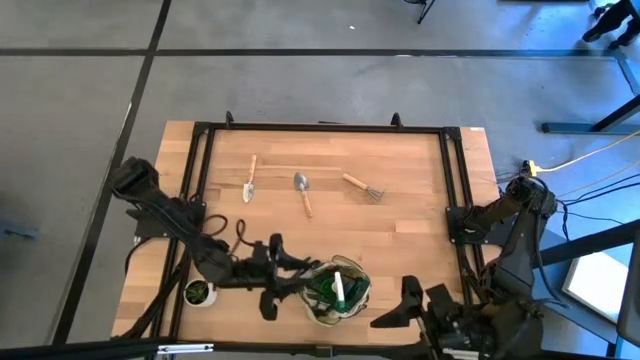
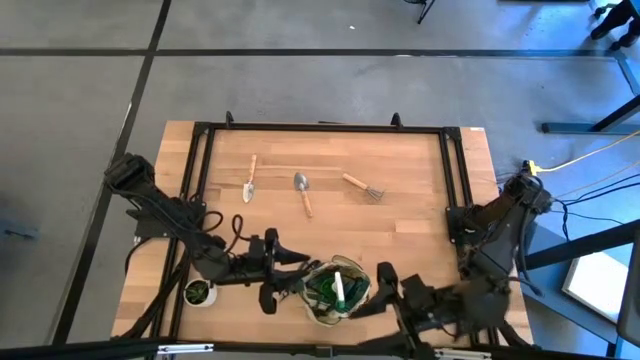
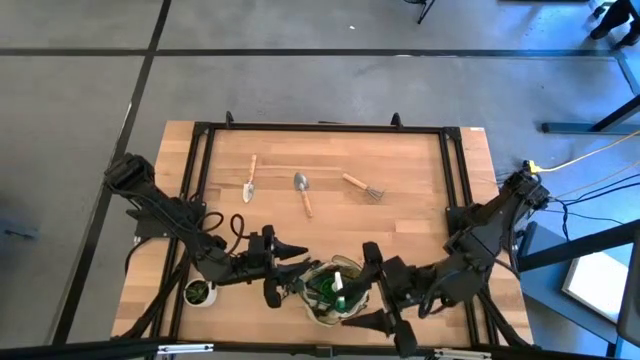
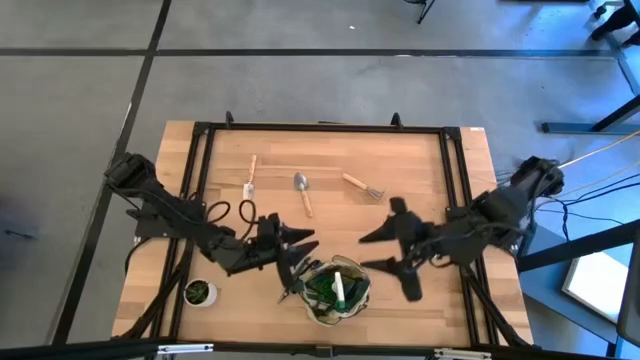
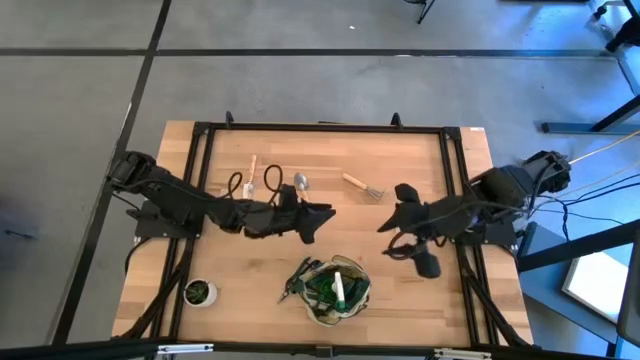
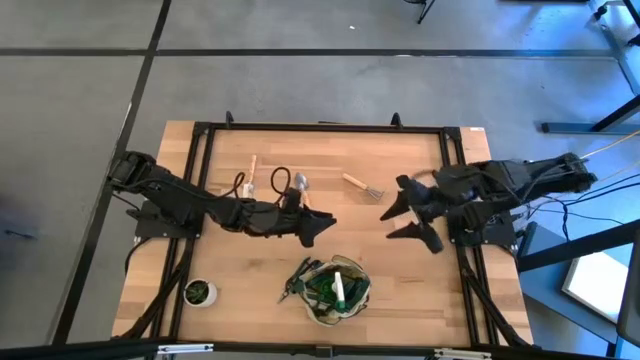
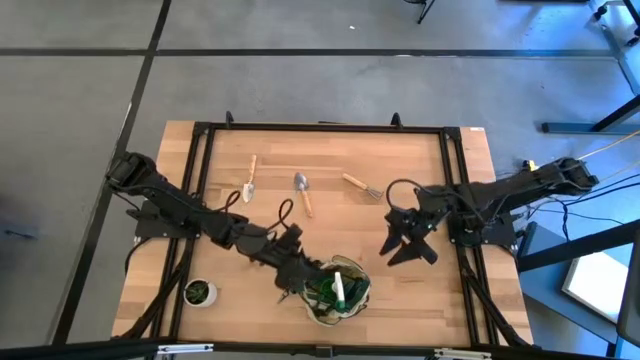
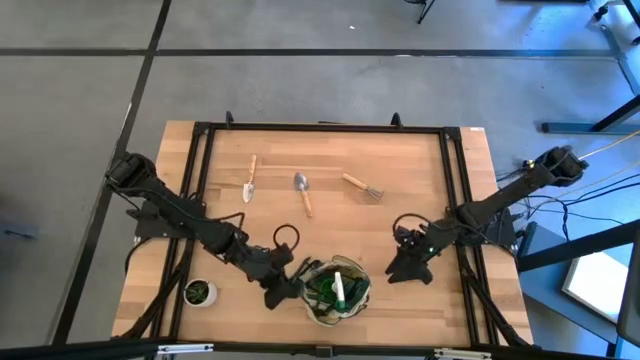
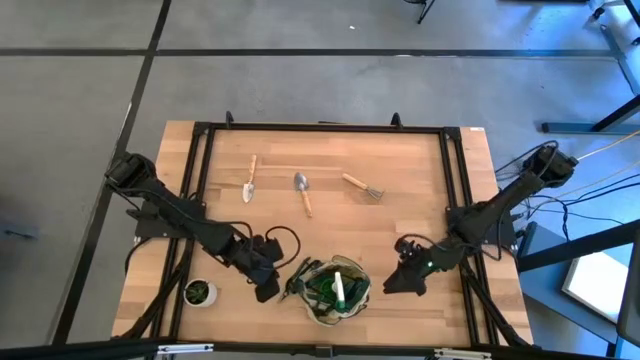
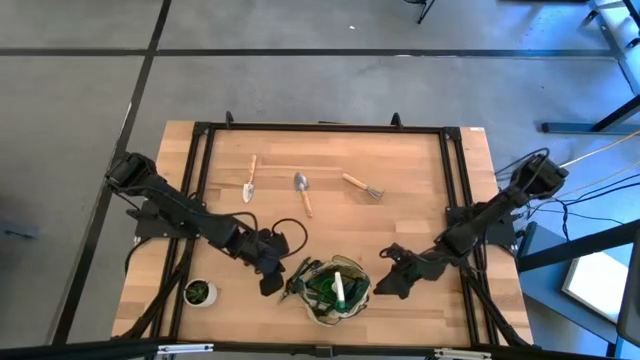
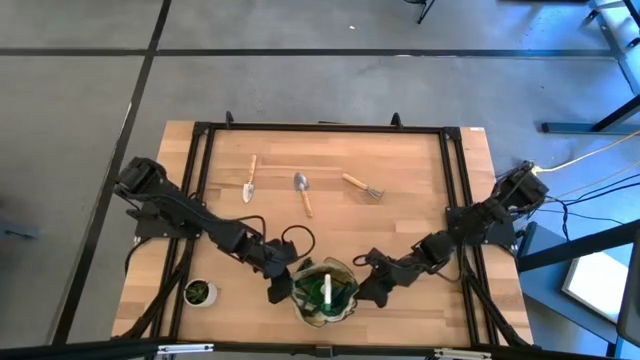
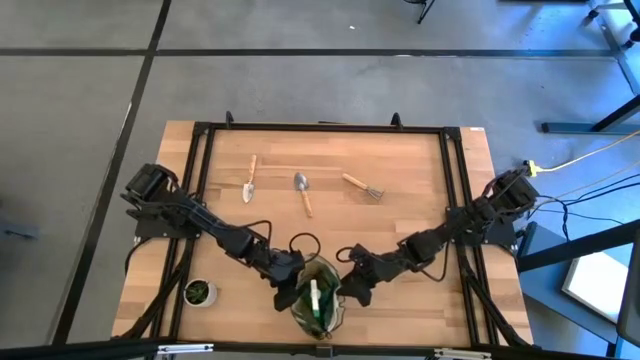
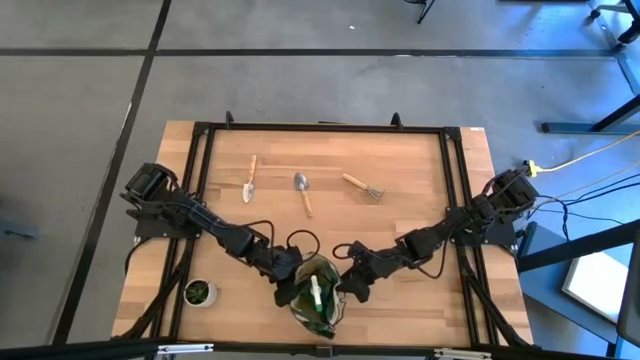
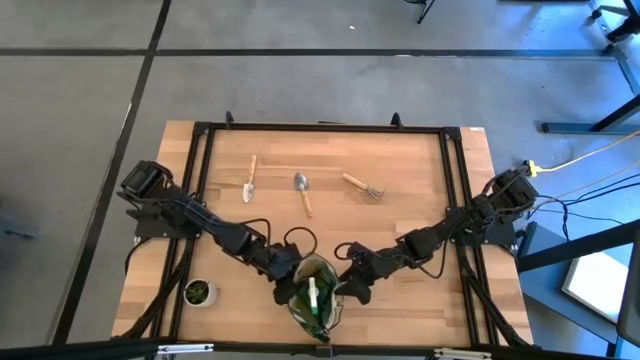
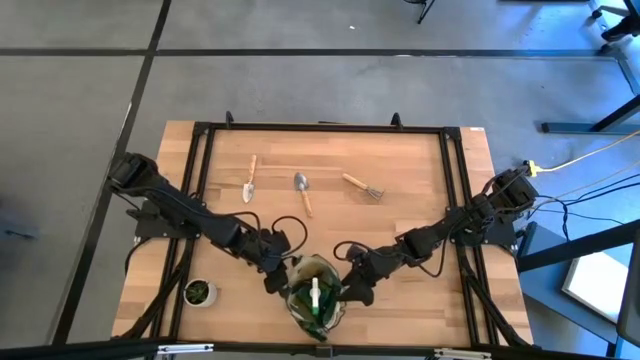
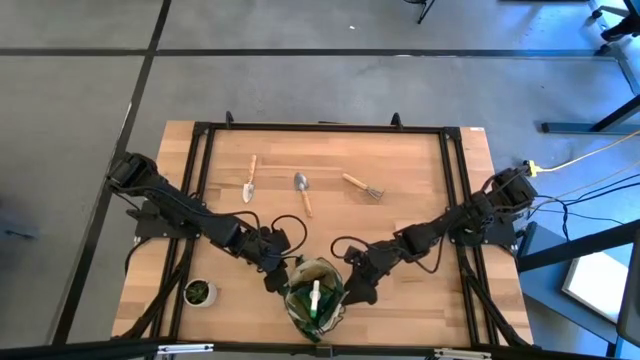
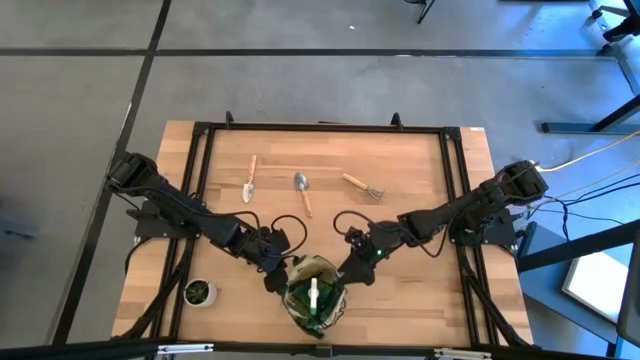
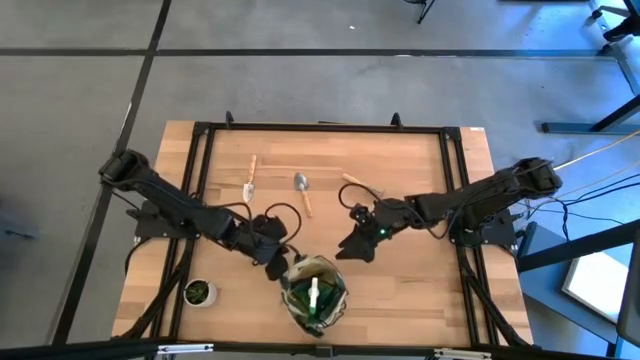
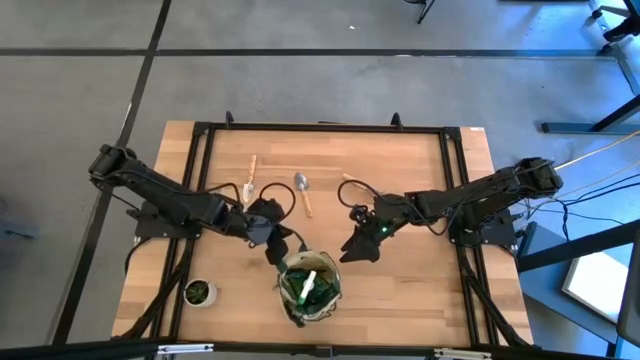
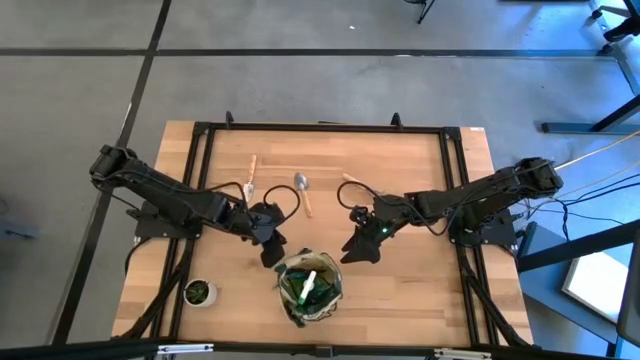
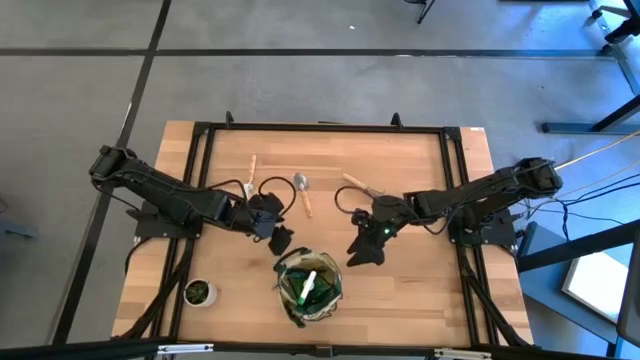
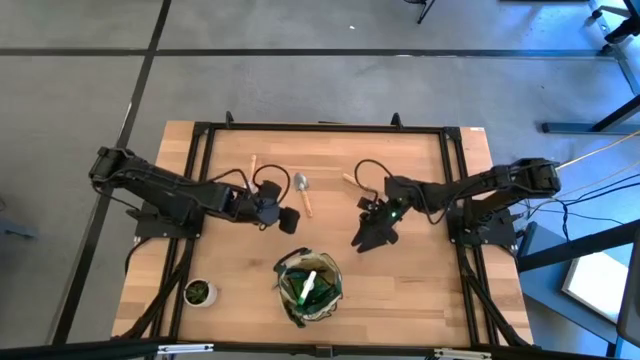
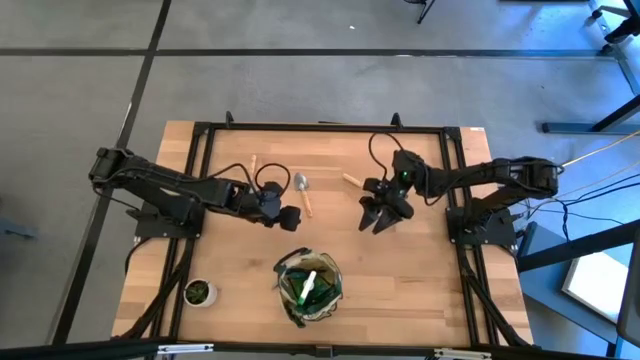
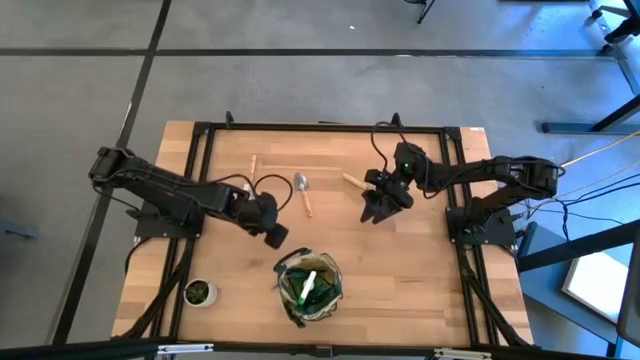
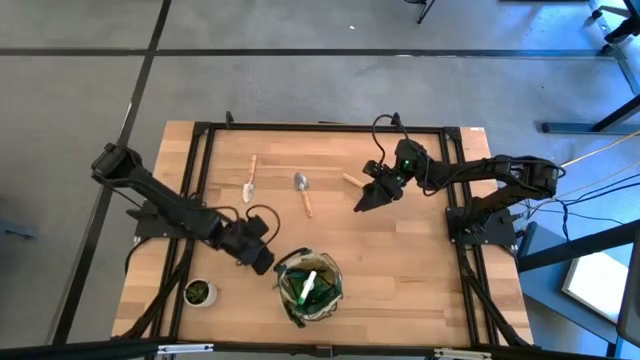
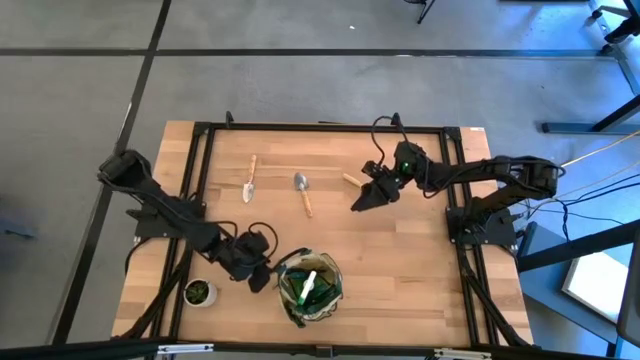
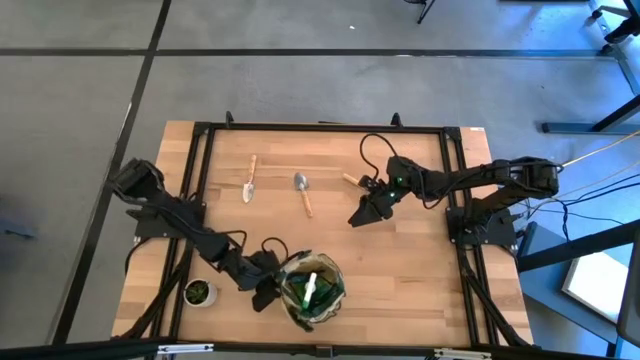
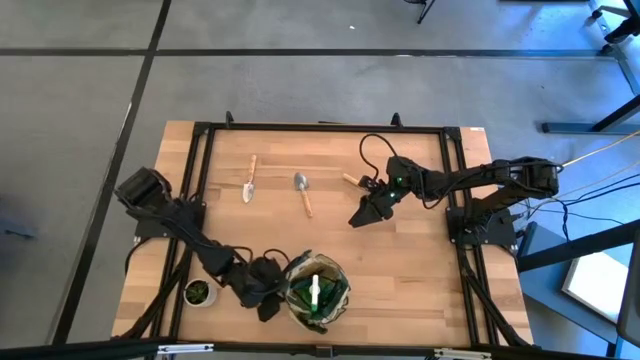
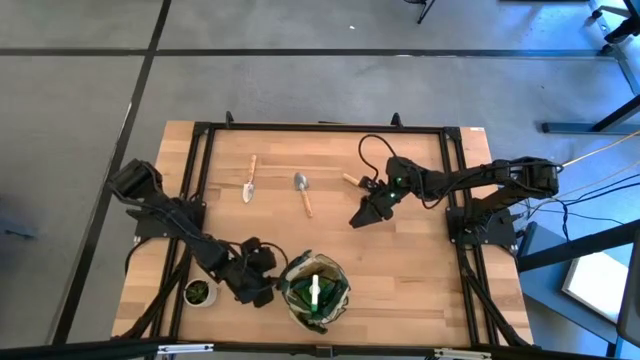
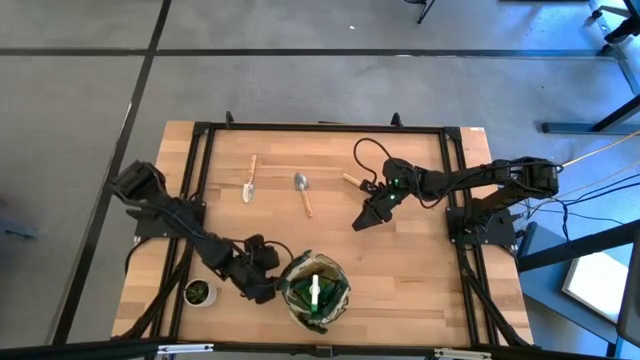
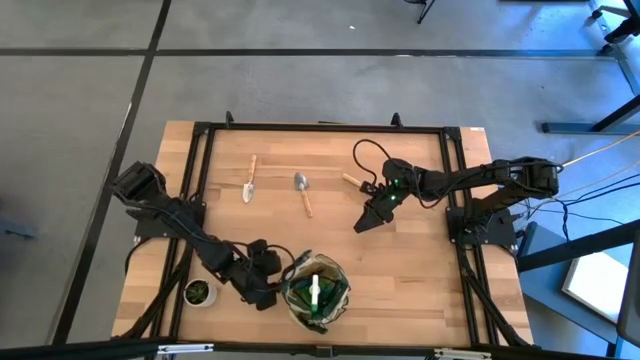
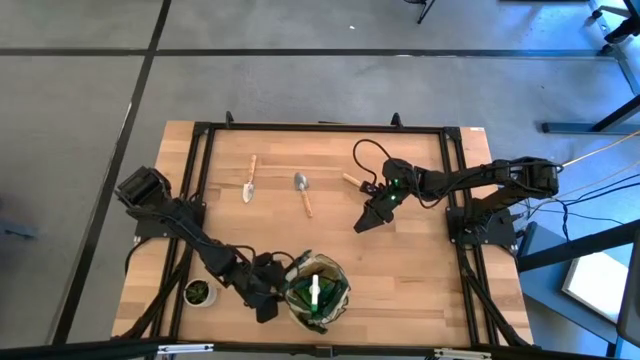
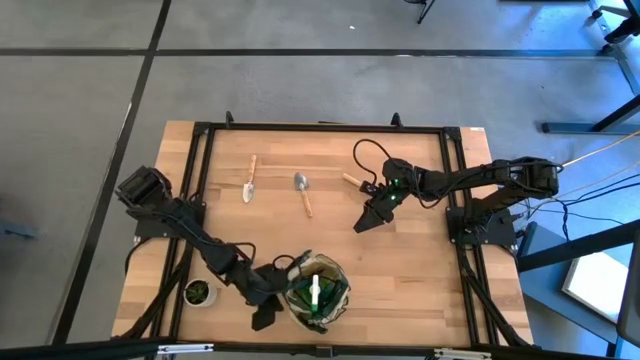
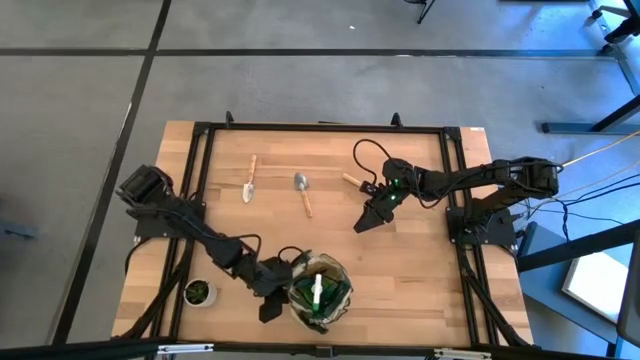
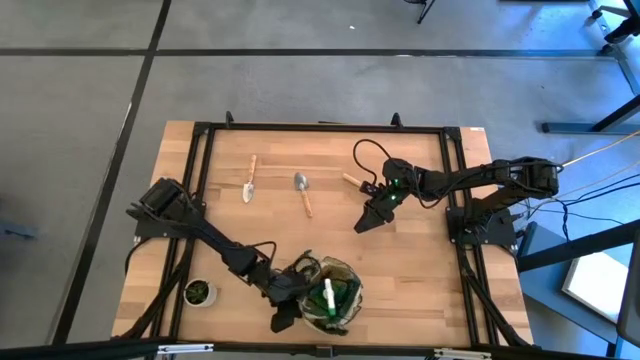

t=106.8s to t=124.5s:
Task: Pick & Place Garden tools in Gardening bag
Adjust the gardening bag
